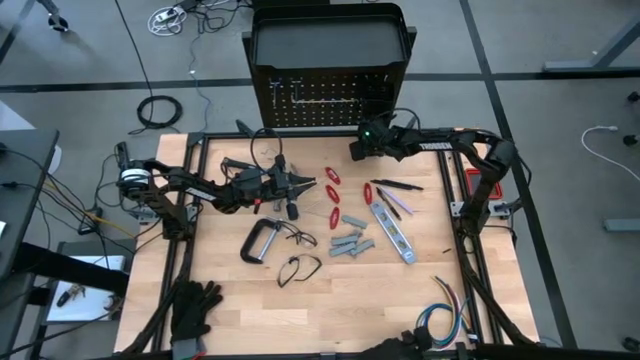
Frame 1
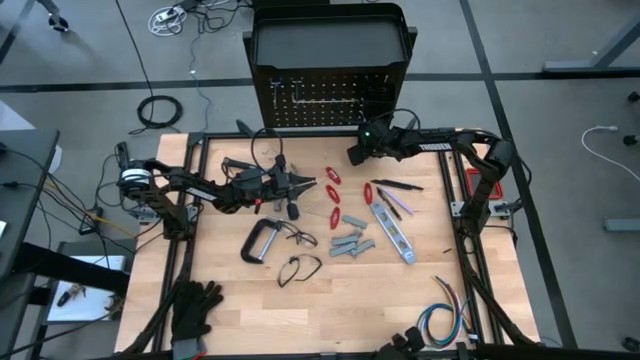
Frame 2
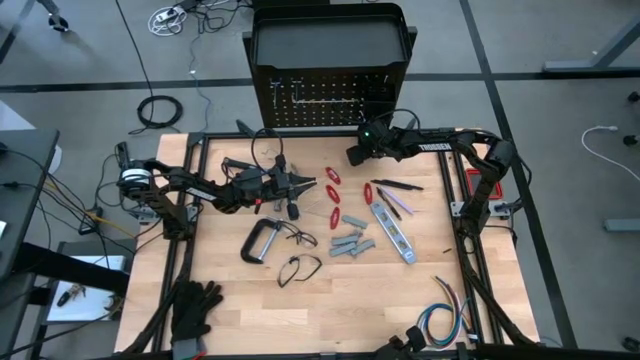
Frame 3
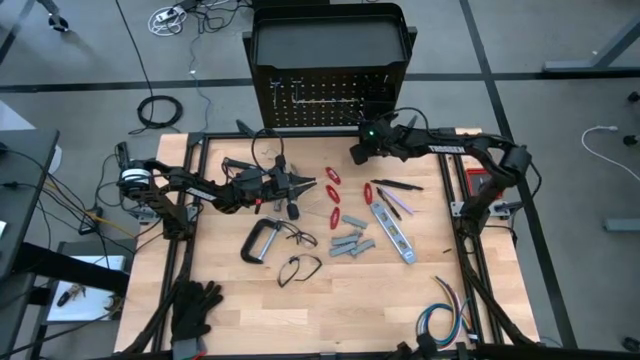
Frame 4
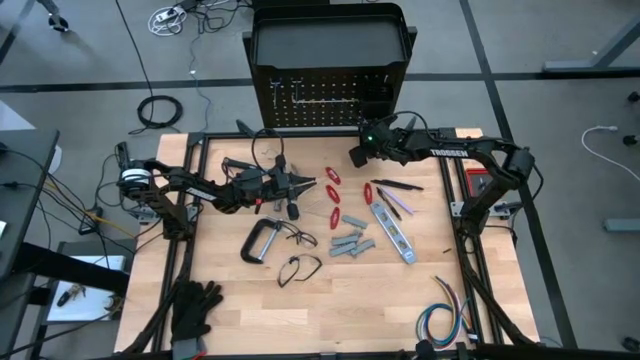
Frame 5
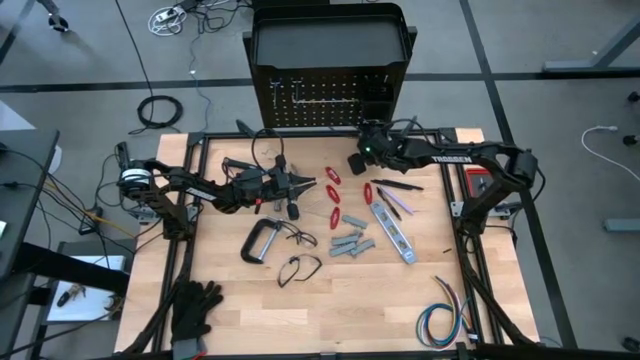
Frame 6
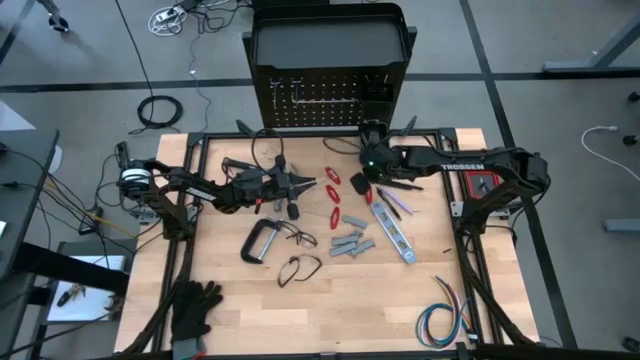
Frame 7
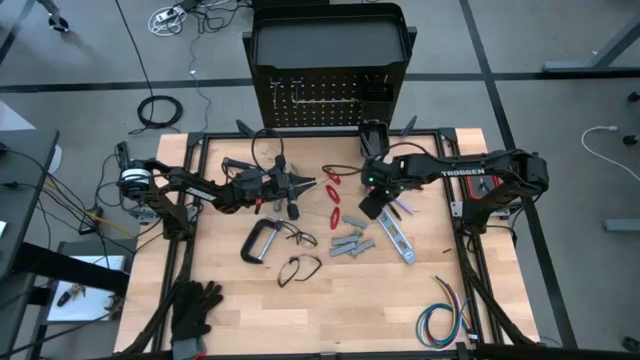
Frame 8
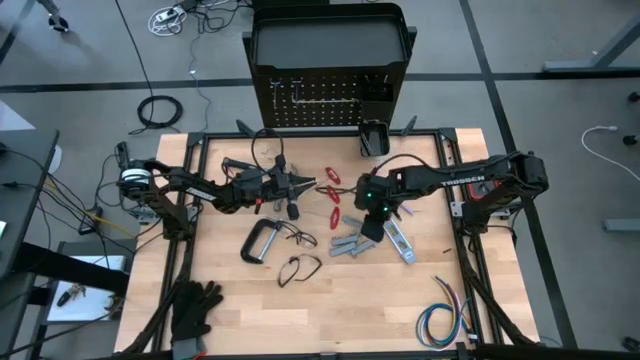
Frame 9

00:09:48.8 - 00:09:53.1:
Task: Hang tools onto peg board
Put the screwdriver bits on the table

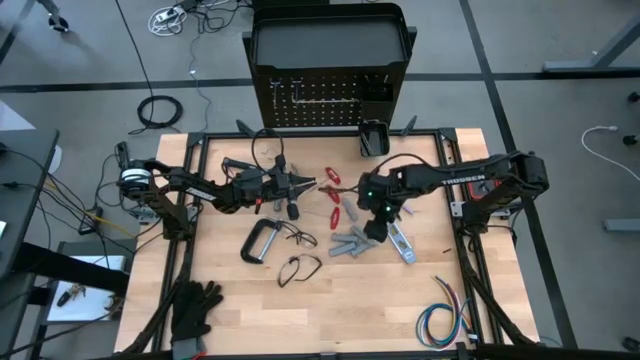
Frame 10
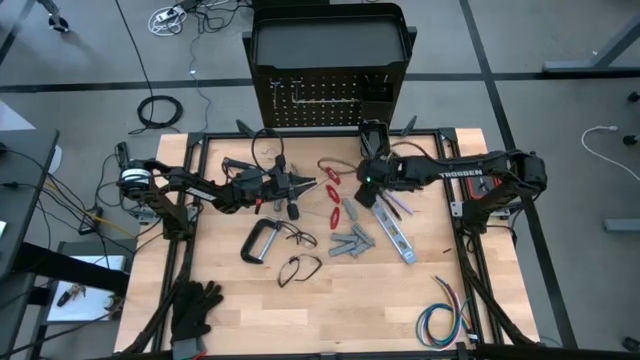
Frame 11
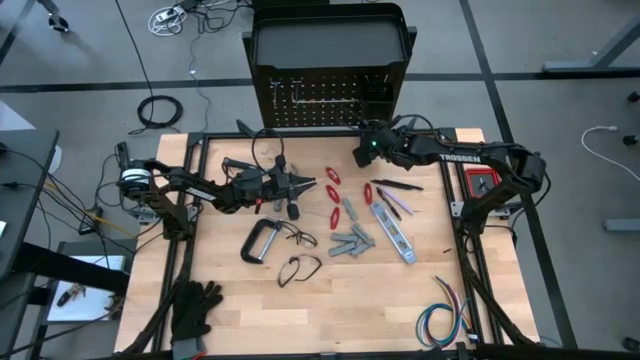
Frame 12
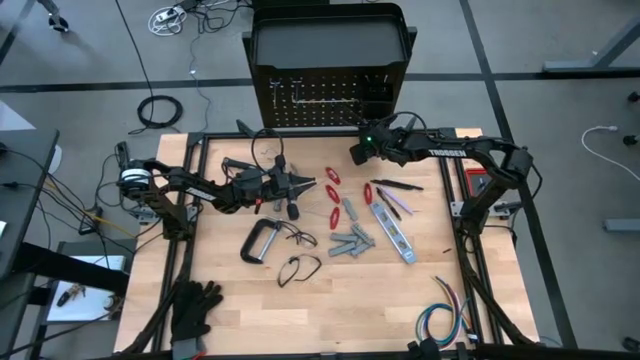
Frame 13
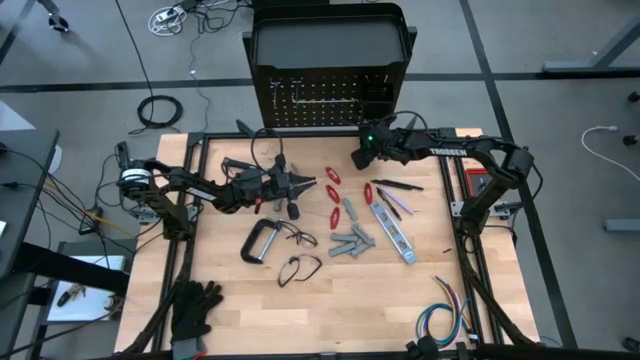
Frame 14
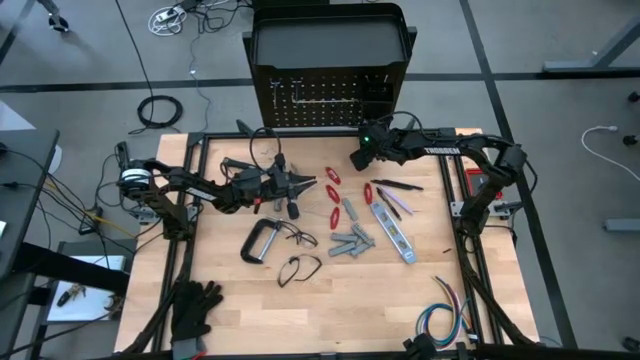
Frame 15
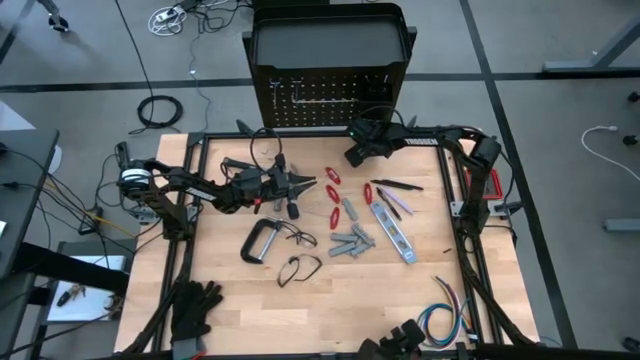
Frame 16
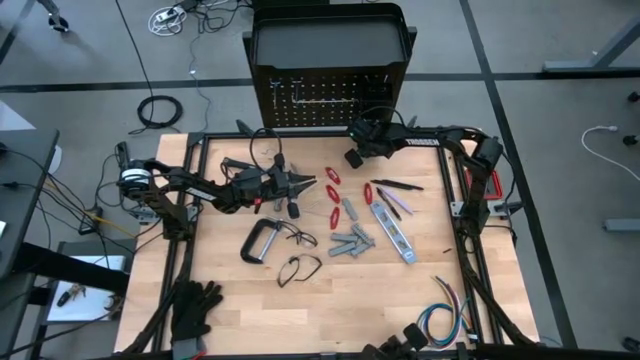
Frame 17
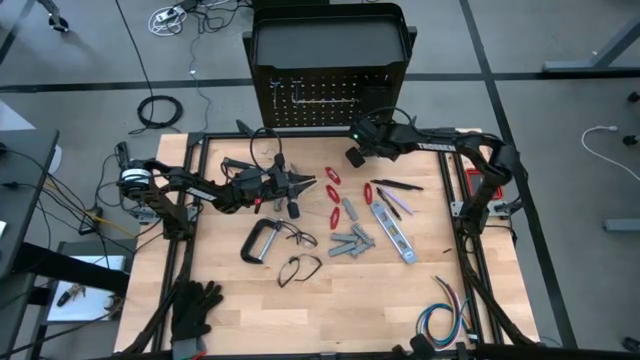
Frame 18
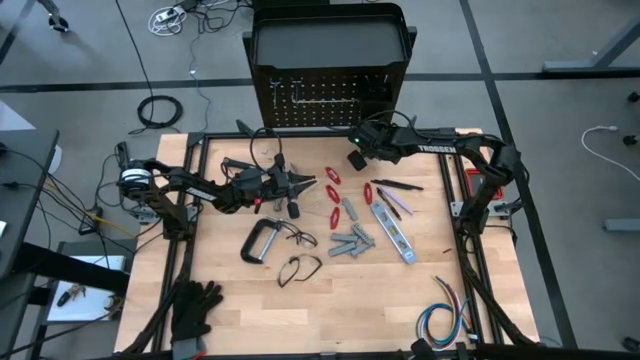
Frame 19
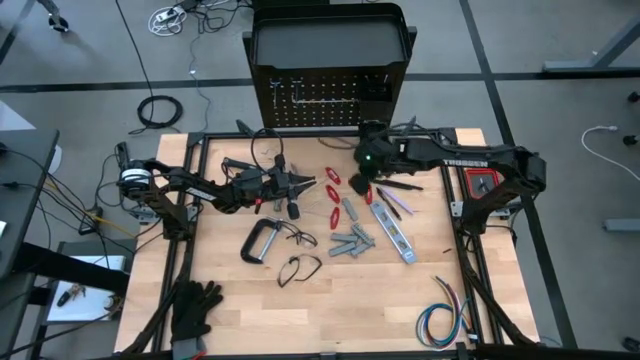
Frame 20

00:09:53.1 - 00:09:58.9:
Put the screwdriver bits on the table

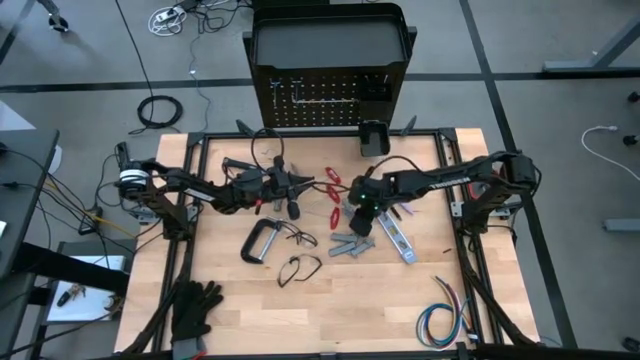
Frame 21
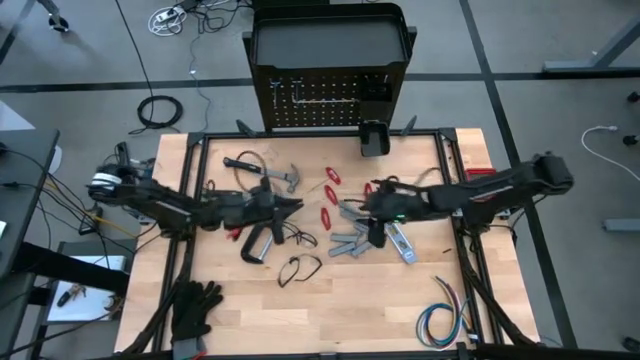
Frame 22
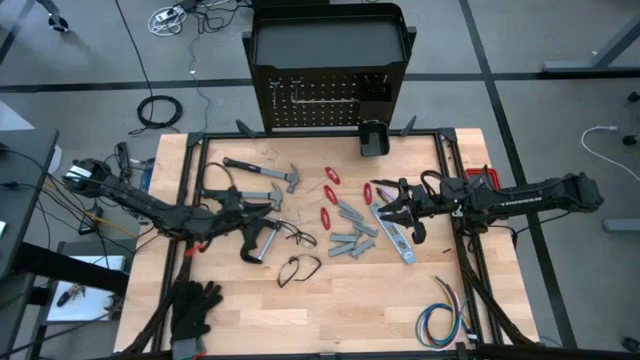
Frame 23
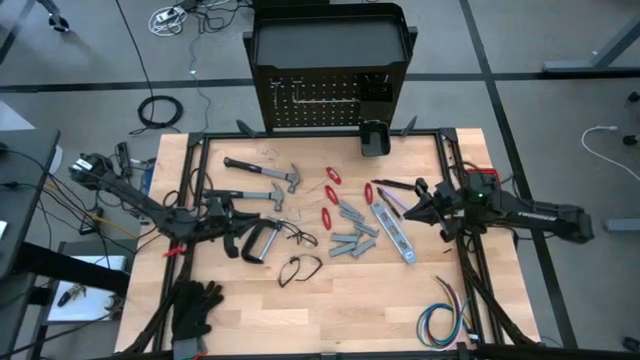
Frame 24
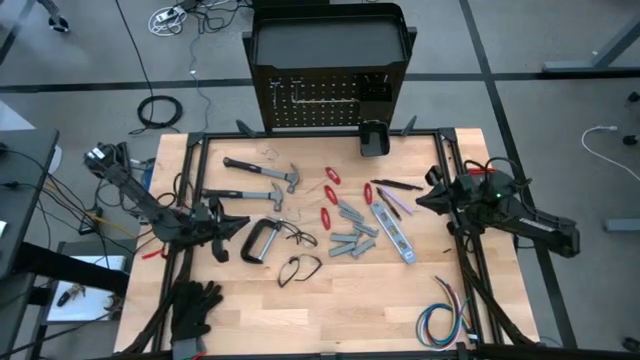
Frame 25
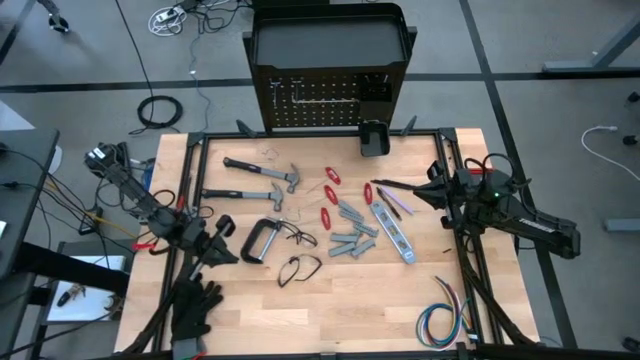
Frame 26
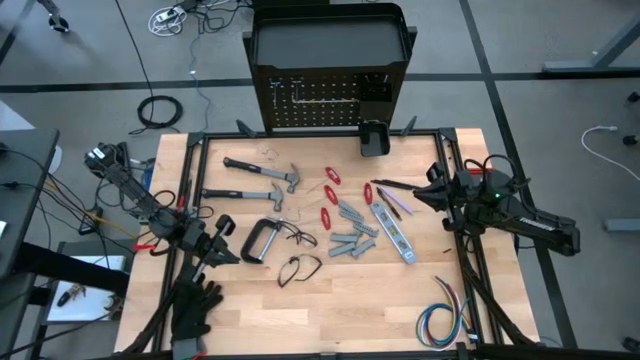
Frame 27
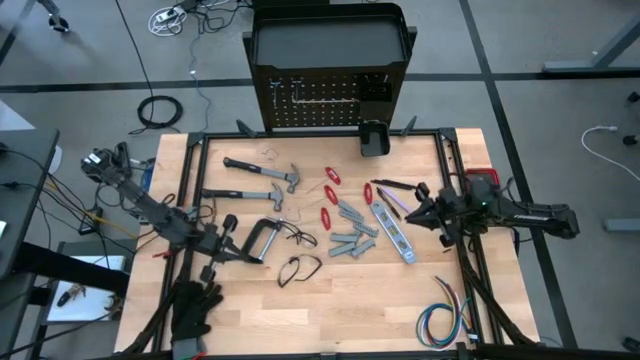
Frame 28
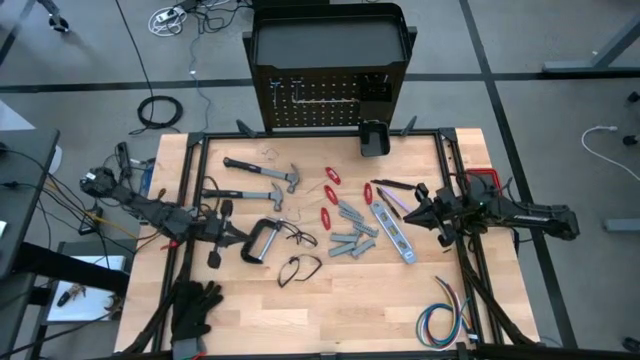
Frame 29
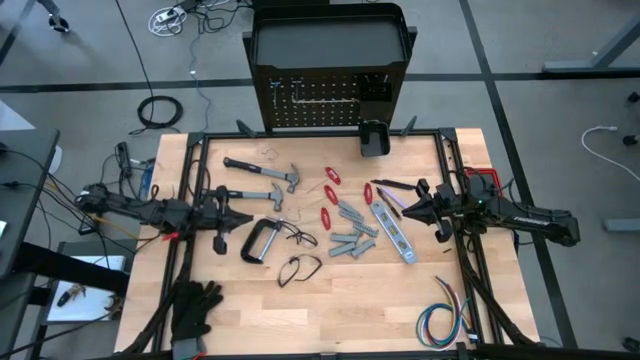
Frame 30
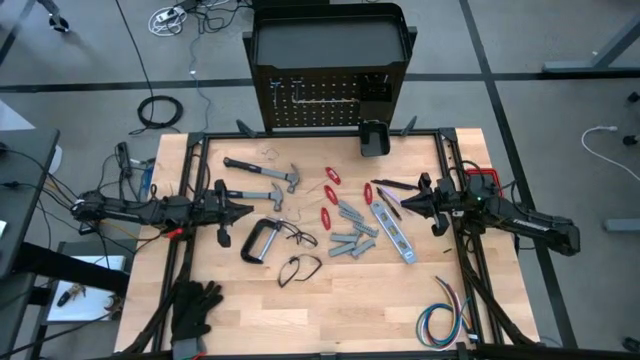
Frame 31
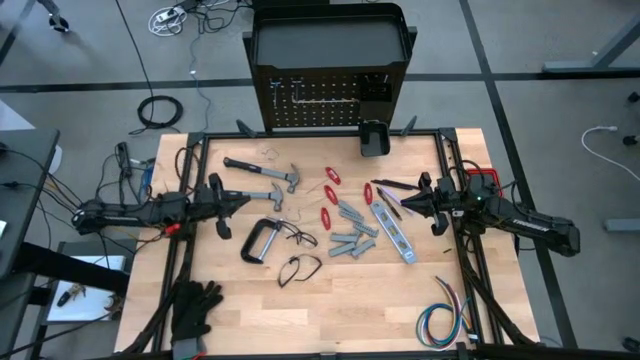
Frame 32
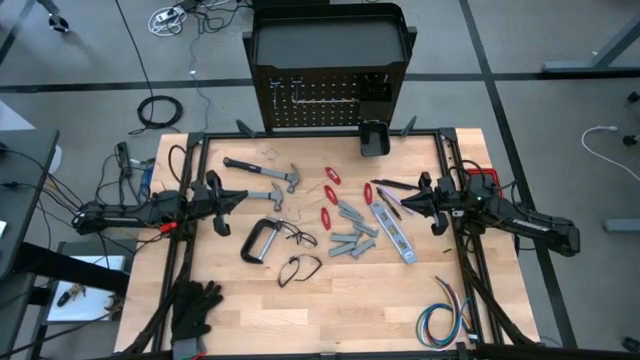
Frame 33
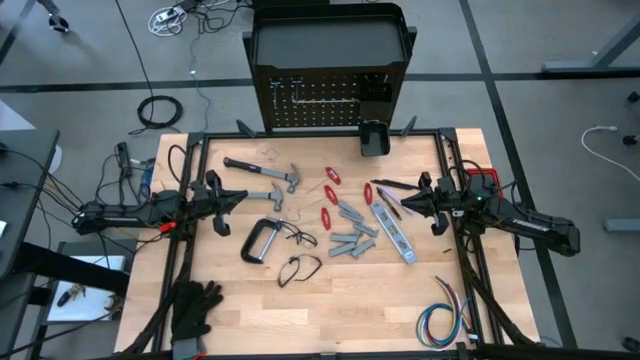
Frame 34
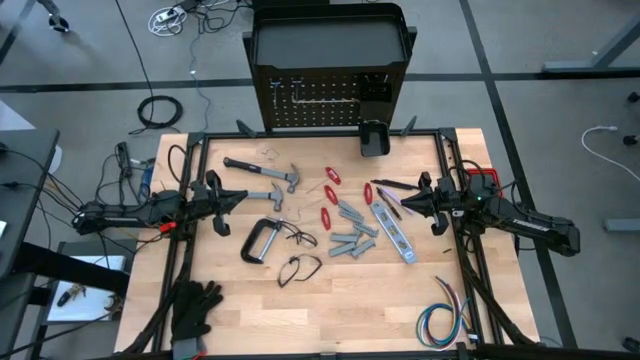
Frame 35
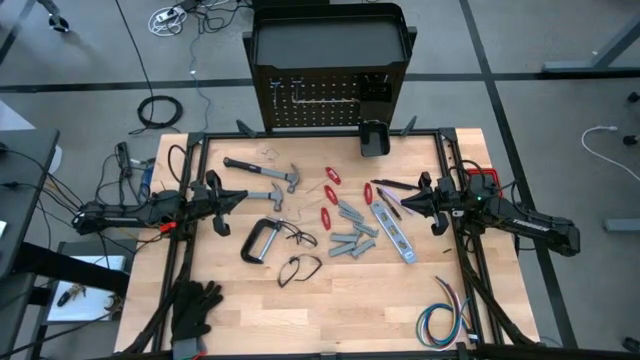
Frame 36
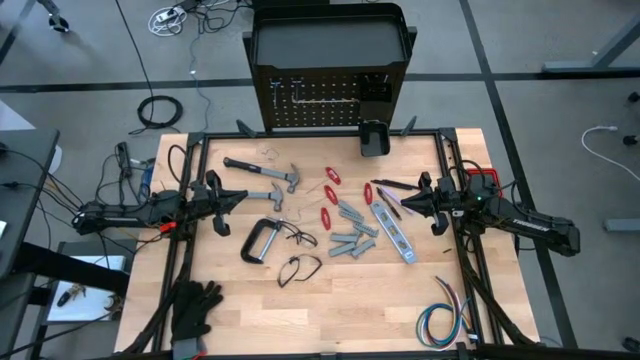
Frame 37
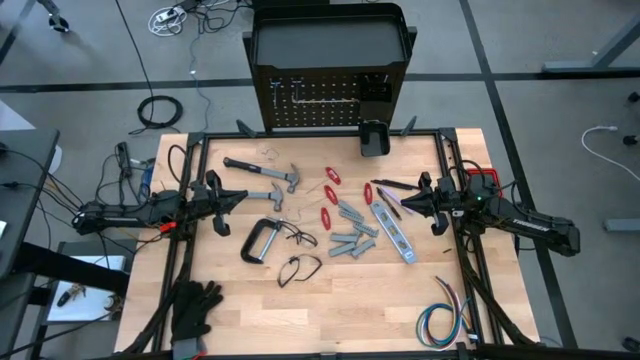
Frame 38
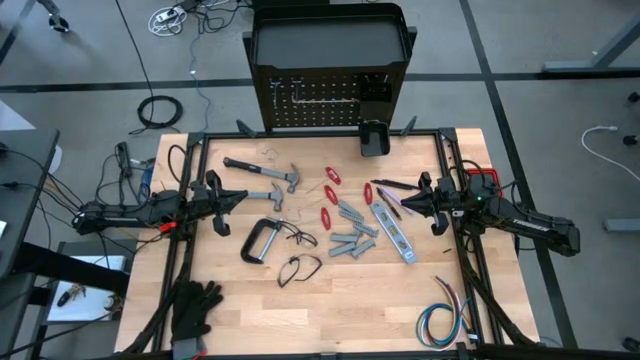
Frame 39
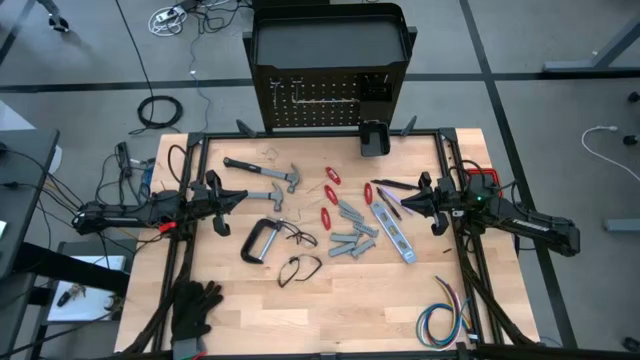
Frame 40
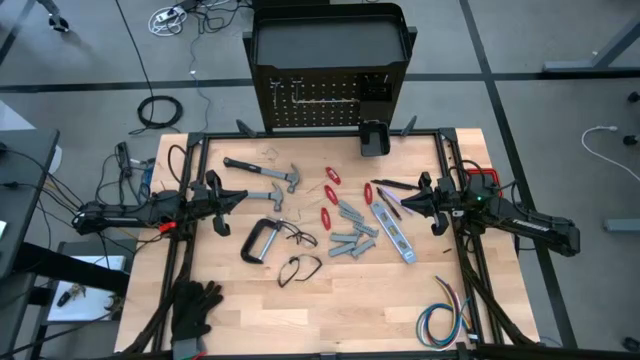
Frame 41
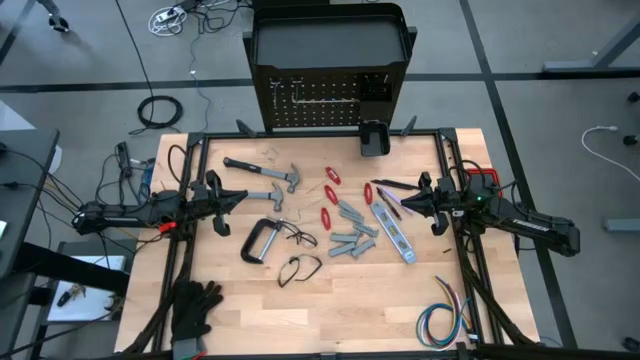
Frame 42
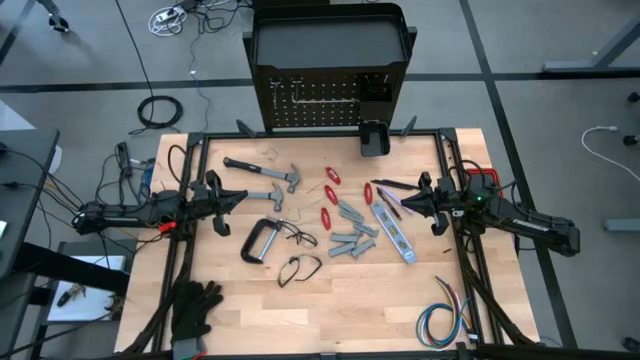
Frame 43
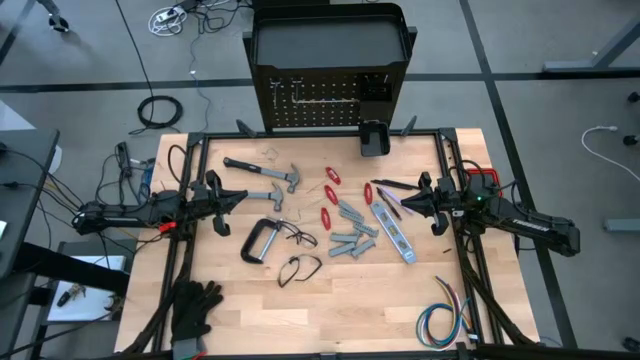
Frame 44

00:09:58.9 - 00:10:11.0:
Return to Home Position
